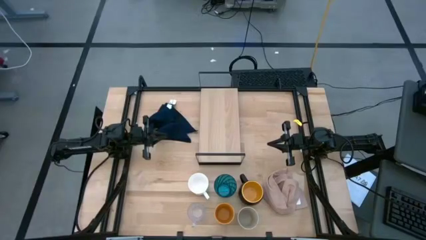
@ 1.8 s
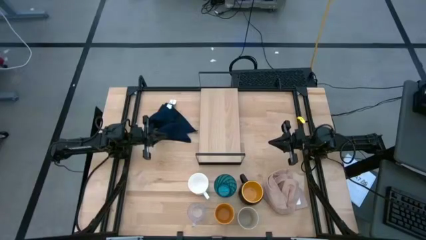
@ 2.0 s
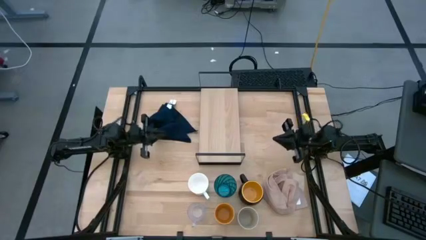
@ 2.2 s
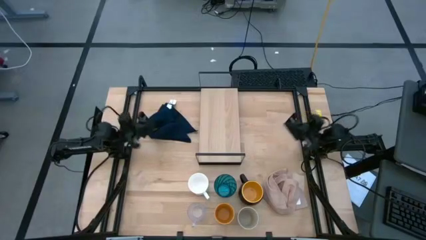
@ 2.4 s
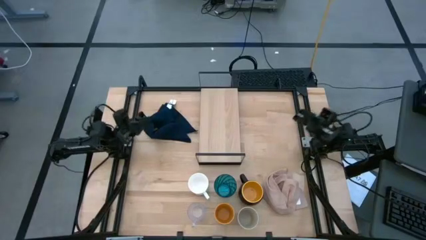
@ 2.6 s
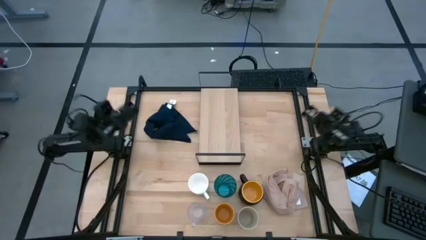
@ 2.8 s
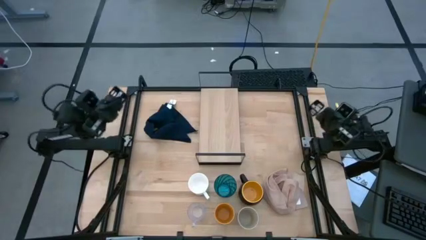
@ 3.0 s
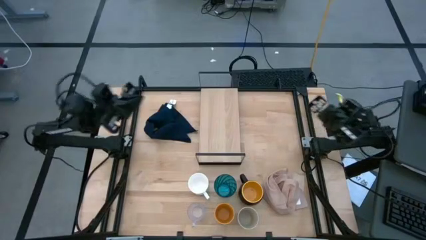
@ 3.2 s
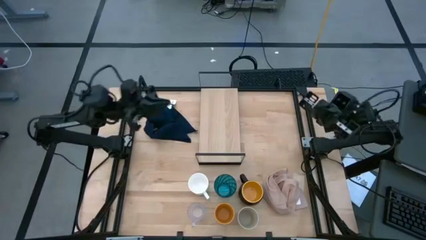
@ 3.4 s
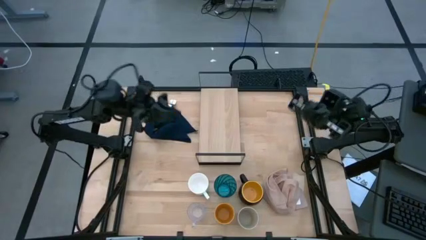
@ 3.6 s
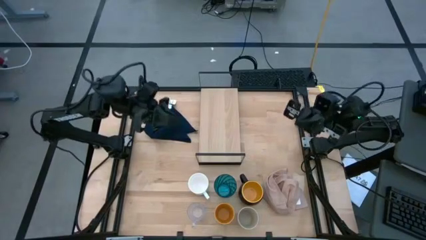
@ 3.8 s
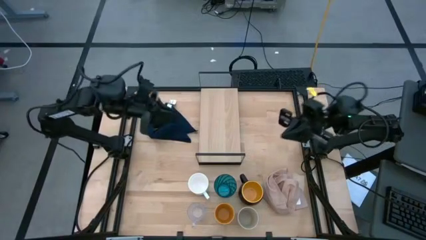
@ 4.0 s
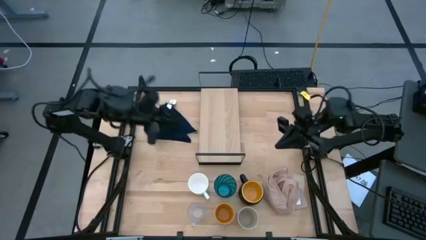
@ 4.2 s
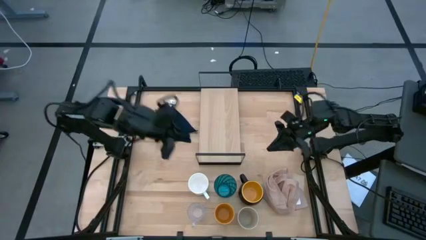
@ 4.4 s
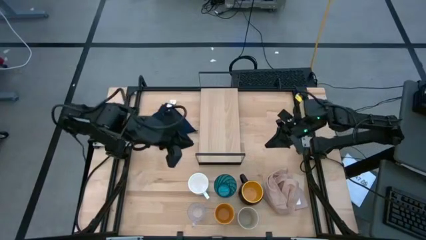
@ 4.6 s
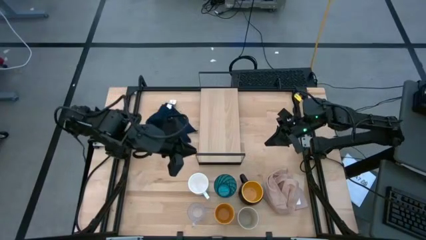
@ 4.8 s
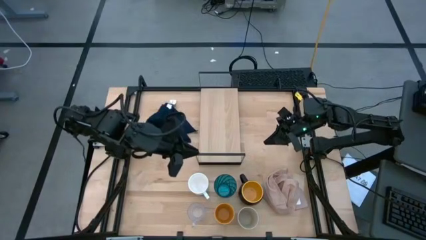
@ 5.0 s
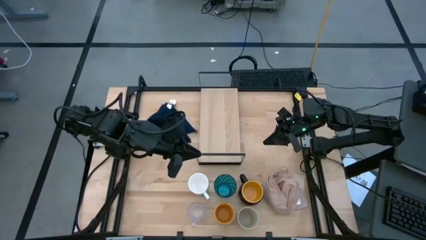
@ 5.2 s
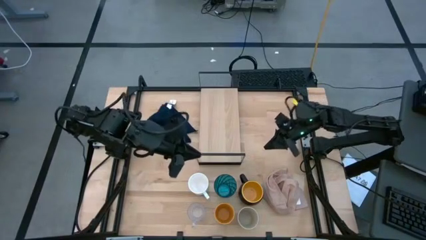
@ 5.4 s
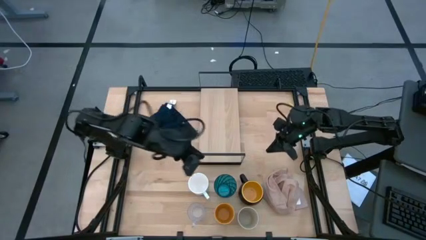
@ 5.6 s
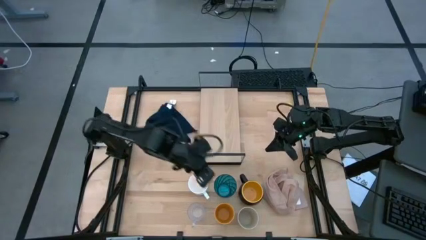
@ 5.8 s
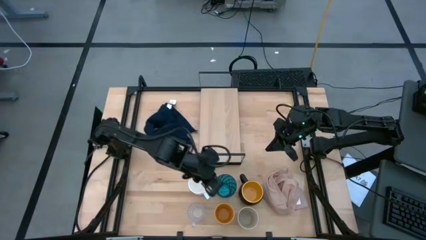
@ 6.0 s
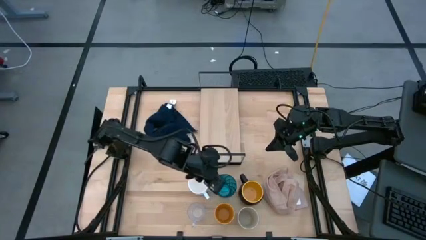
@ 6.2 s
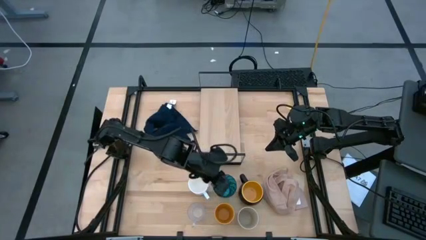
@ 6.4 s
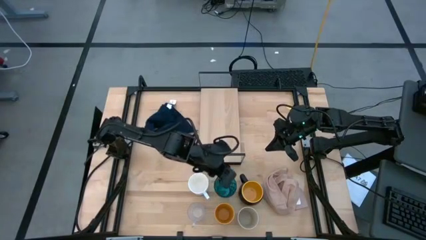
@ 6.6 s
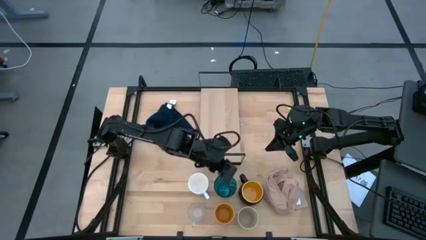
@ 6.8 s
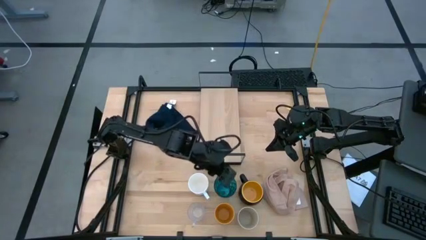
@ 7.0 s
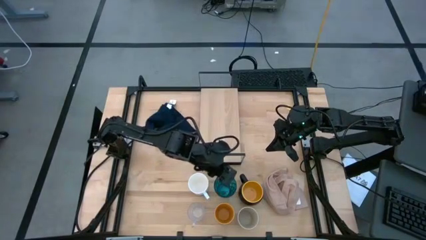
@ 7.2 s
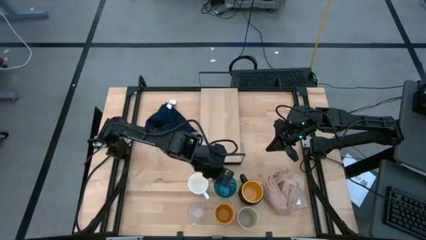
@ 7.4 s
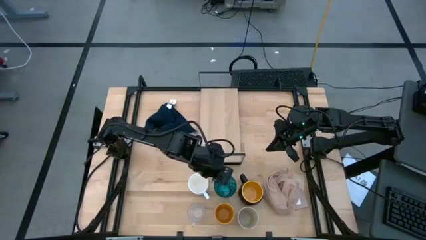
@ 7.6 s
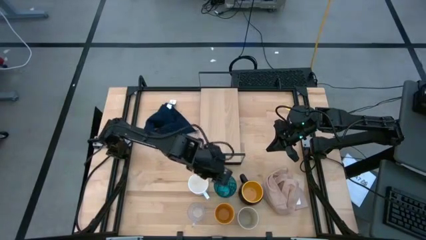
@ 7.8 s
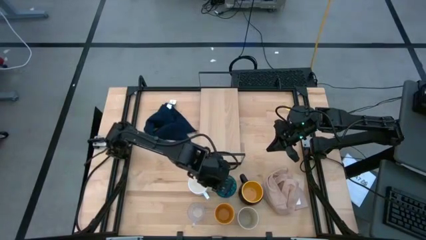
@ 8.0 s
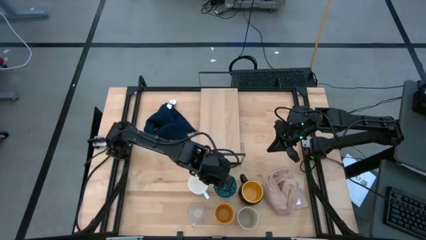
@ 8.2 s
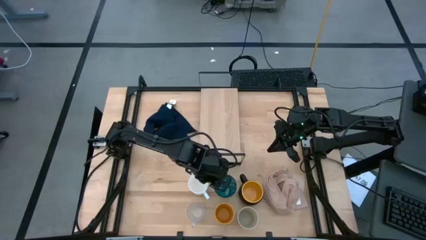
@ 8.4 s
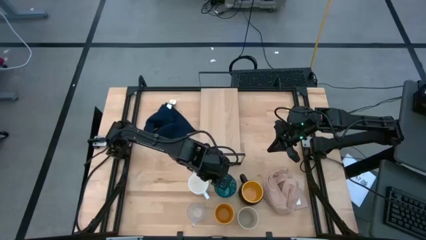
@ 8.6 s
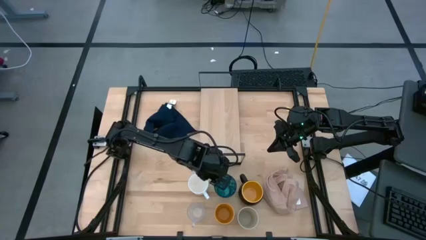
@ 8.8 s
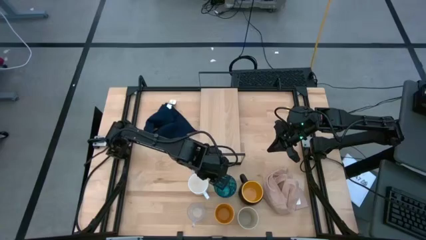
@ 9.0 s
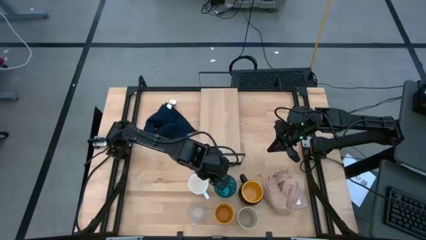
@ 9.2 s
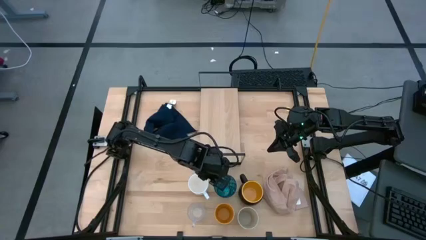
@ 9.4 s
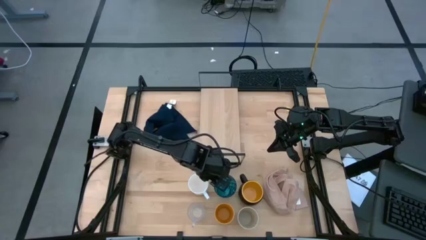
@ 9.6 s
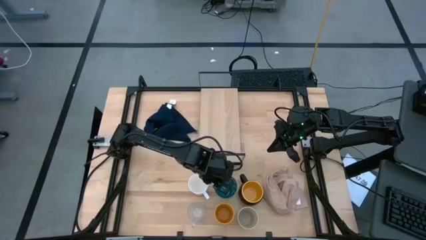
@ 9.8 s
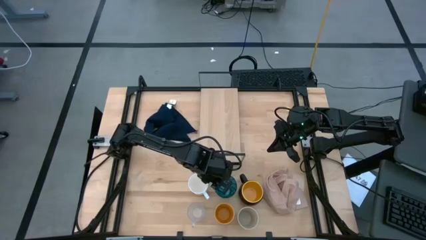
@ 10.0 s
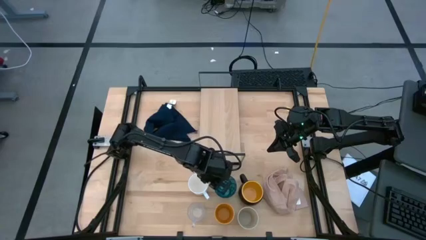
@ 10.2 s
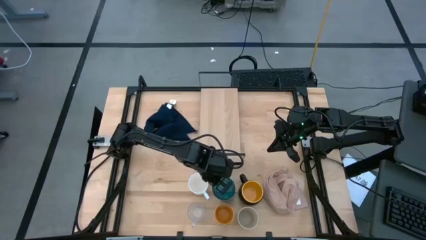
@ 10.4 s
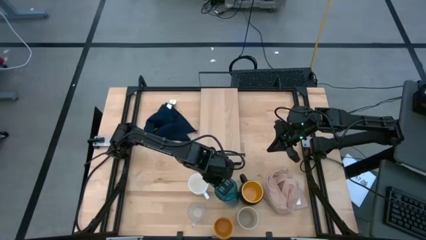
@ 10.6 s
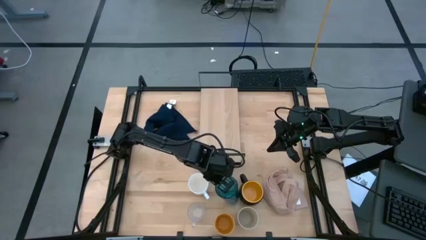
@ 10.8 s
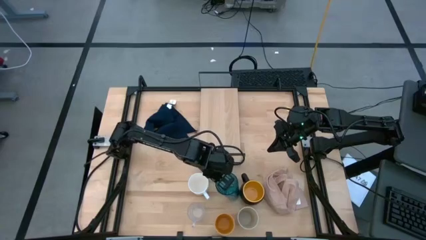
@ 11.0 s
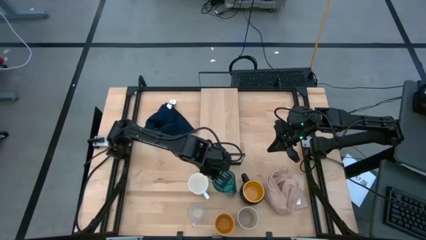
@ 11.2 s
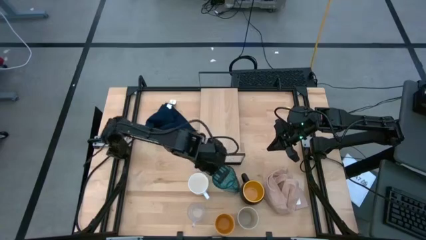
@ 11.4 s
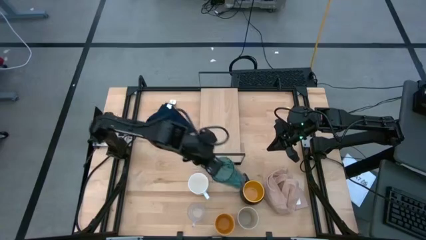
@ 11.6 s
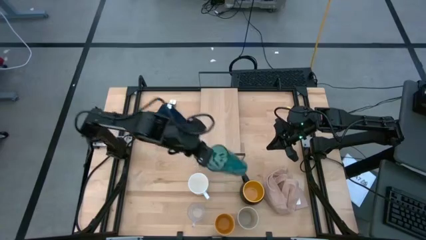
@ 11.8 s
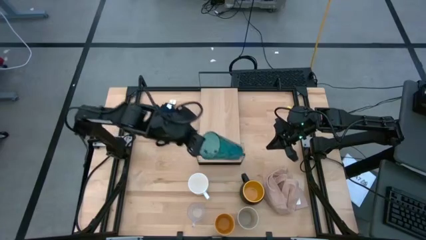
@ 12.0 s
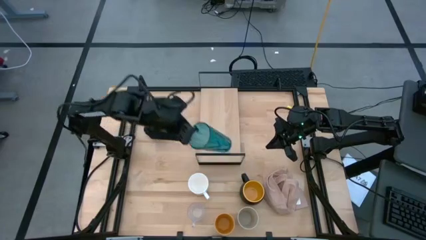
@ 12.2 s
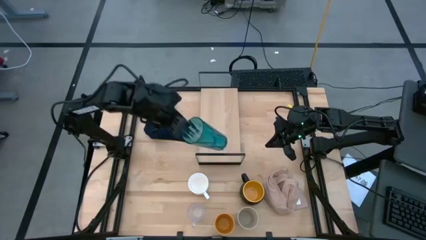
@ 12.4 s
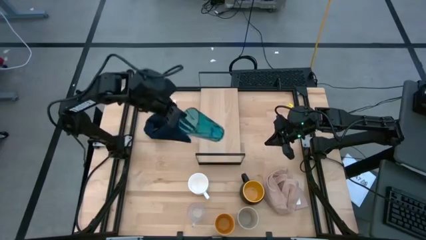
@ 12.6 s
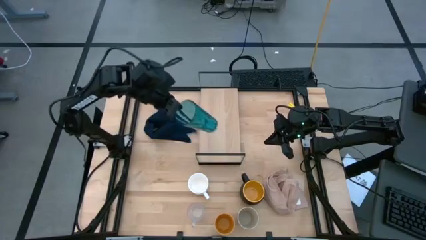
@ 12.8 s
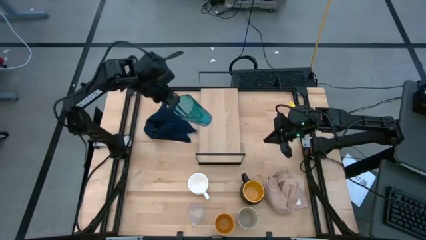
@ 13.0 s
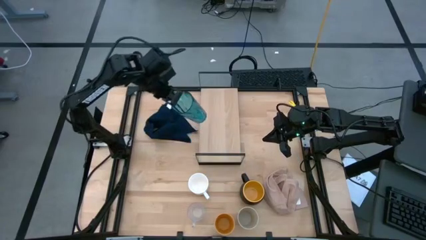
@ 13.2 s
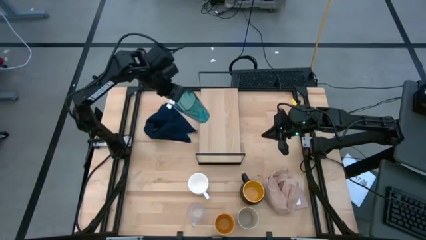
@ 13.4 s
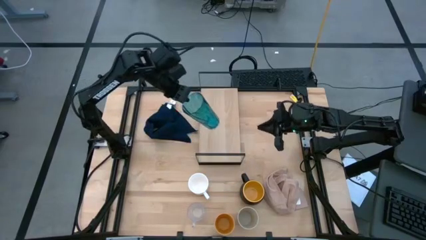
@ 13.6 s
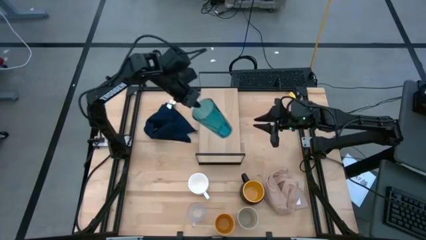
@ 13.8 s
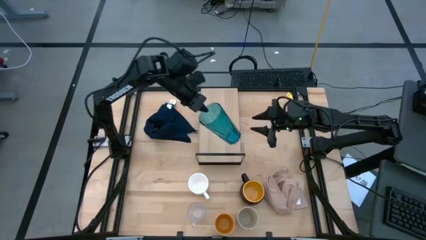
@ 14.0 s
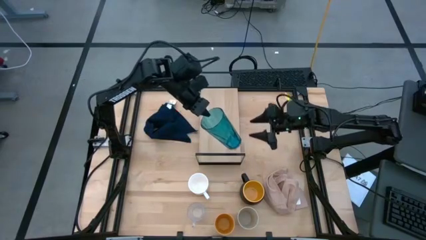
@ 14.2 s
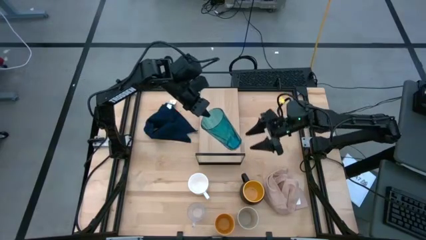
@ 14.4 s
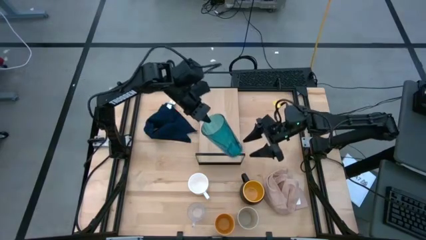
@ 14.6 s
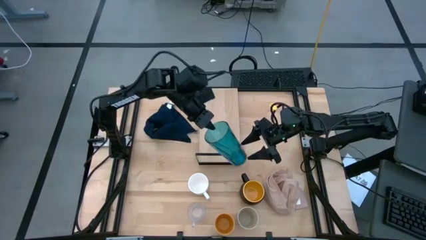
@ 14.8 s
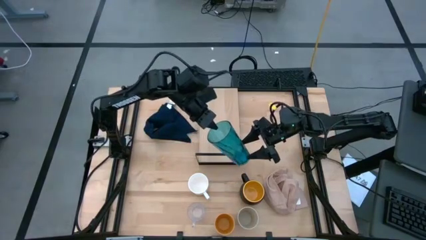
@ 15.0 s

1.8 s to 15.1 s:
Task: Stack small to large cups/mugs on shelf
Put the blue cup on the shelf

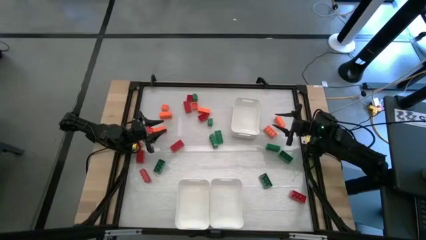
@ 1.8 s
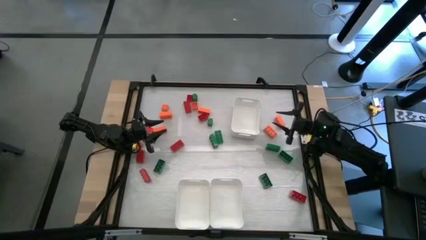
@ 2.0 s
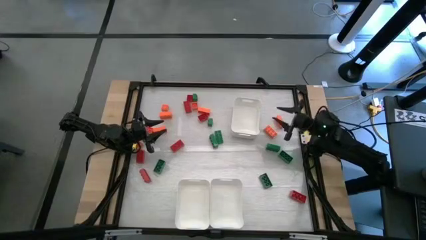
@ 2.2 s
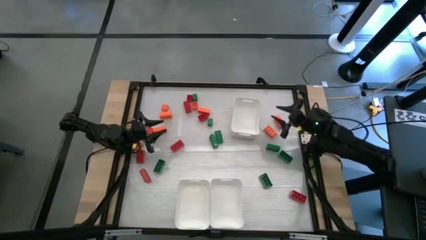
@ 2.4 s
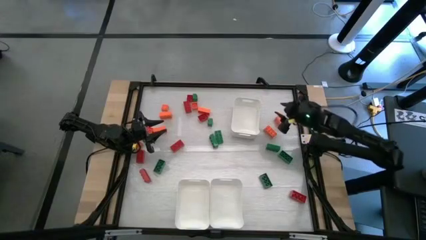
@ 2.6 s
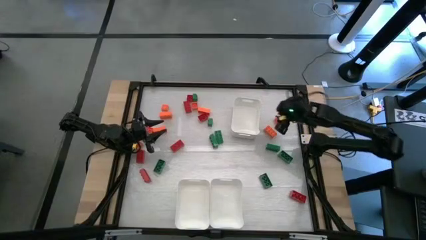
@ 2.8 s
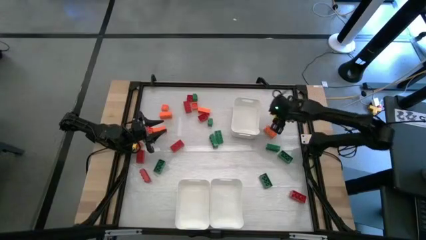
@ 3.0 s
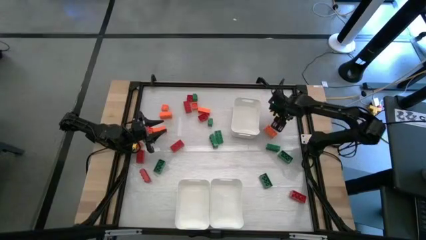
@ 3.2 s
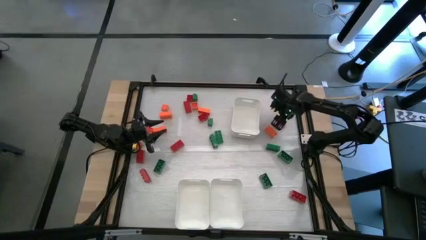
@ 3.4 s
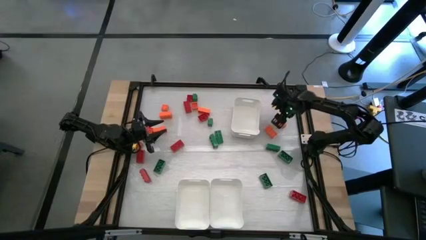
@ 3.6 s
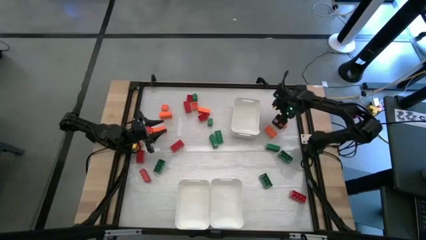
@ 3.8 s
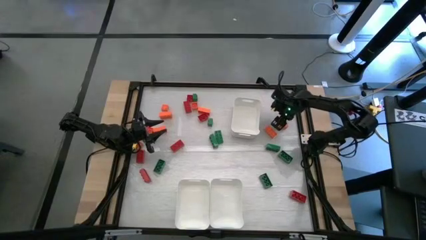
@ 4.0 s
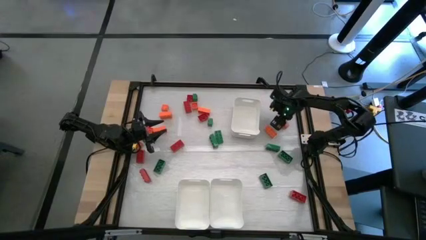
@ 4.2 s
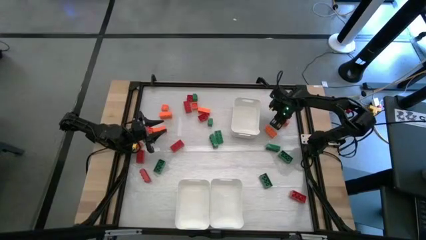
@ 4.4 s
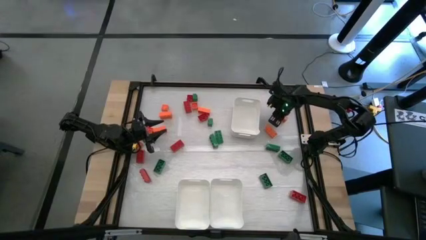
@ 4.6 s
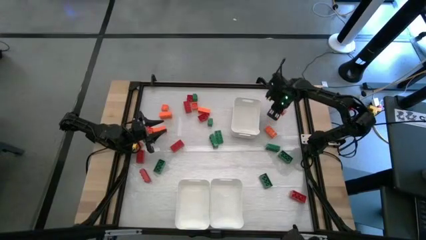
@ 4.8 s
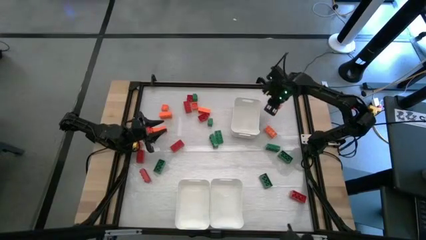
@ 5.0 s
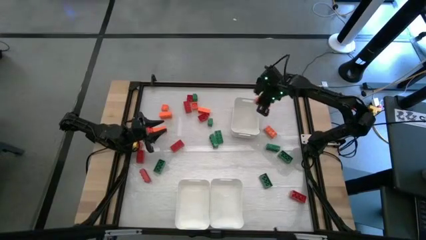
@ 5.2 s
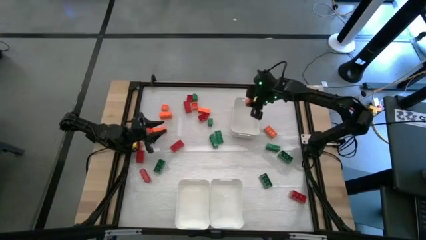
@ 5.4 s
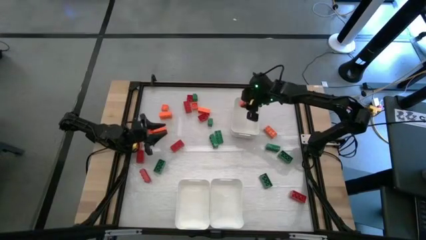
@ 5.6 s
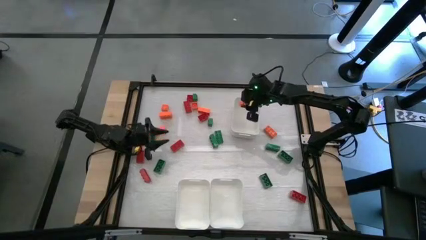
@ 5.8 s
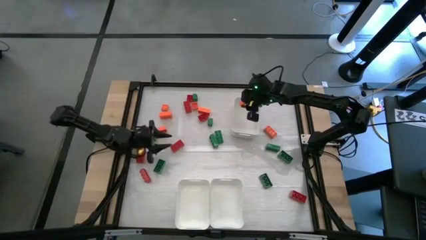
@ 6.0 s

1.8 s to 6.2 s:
Task: Sort blocks
Put the orange game piece into the top right white bin
